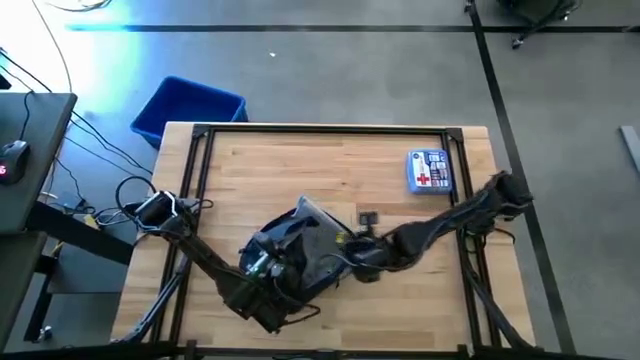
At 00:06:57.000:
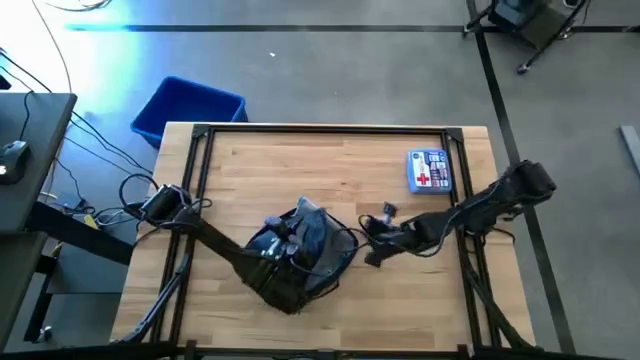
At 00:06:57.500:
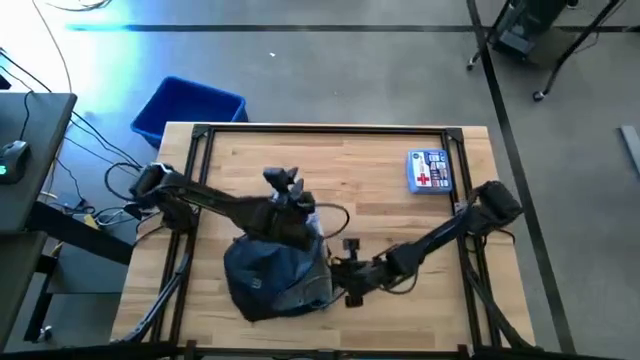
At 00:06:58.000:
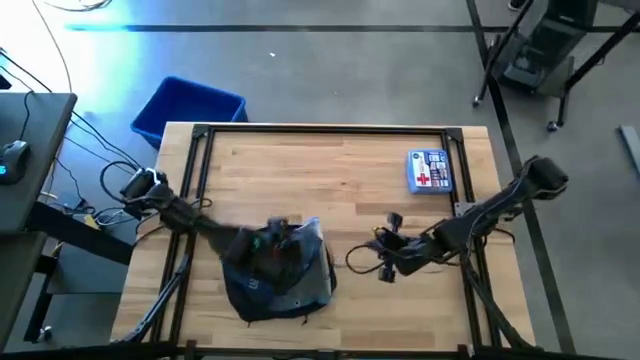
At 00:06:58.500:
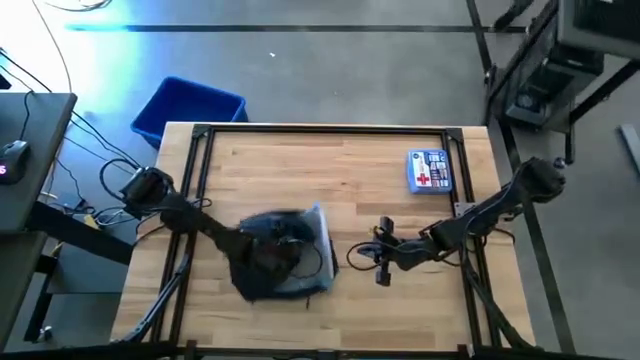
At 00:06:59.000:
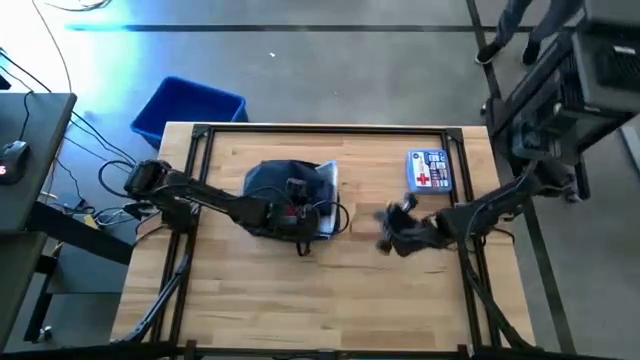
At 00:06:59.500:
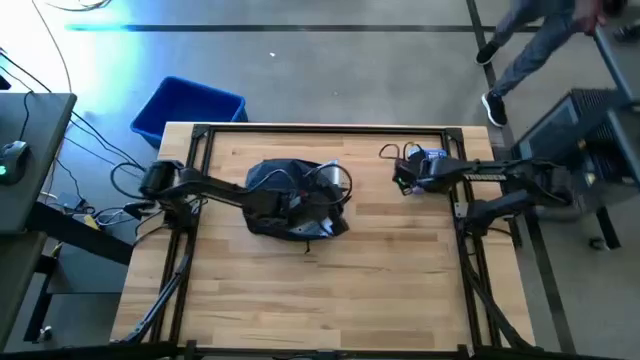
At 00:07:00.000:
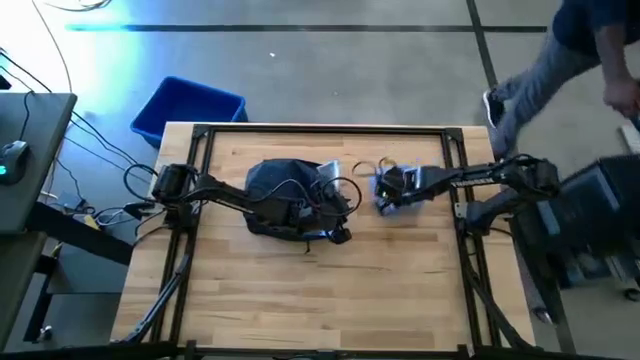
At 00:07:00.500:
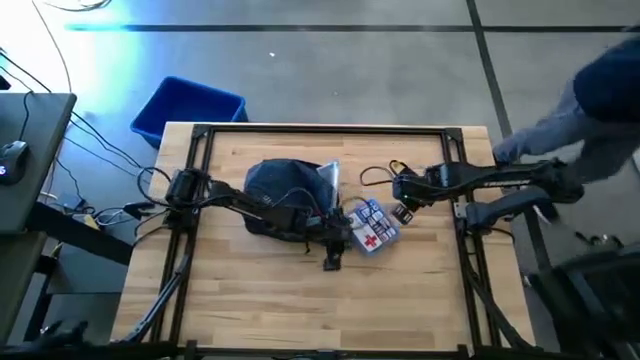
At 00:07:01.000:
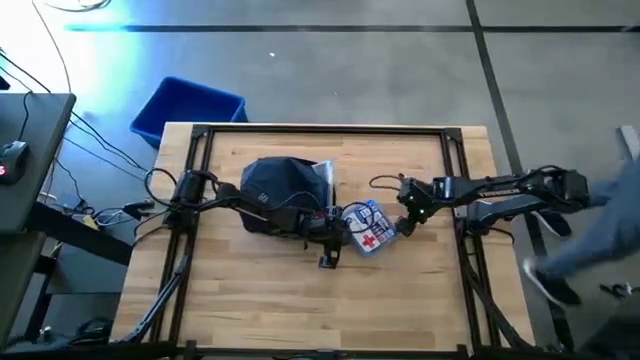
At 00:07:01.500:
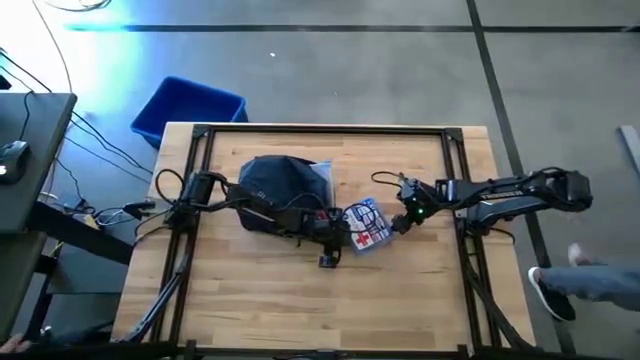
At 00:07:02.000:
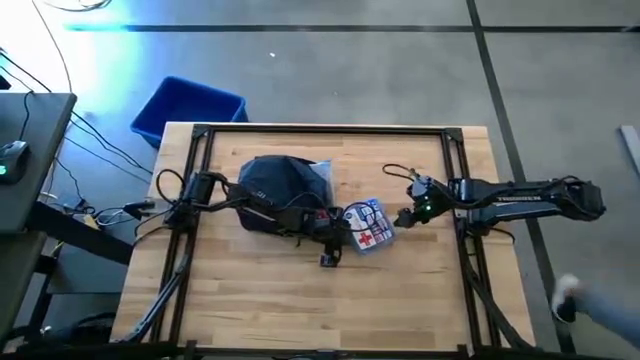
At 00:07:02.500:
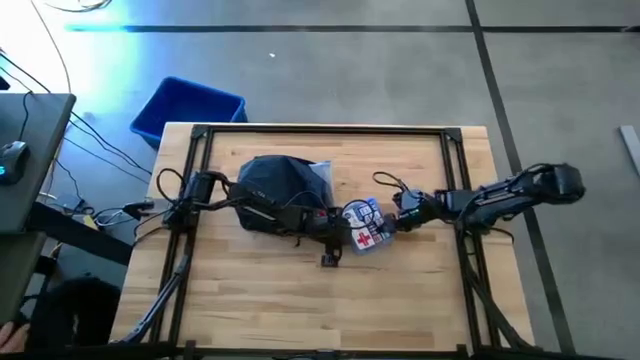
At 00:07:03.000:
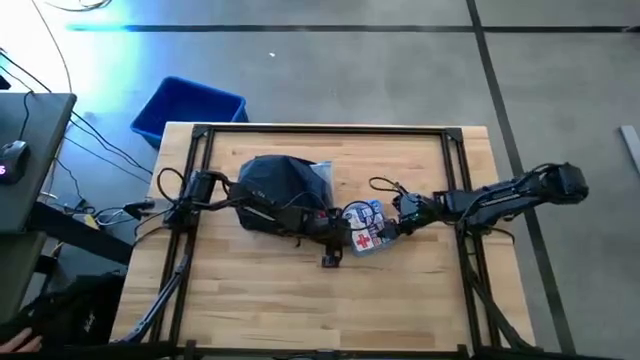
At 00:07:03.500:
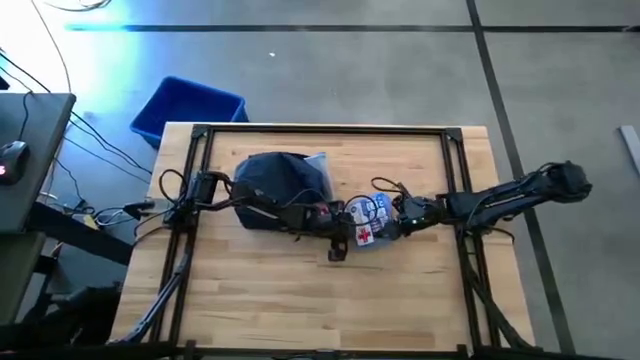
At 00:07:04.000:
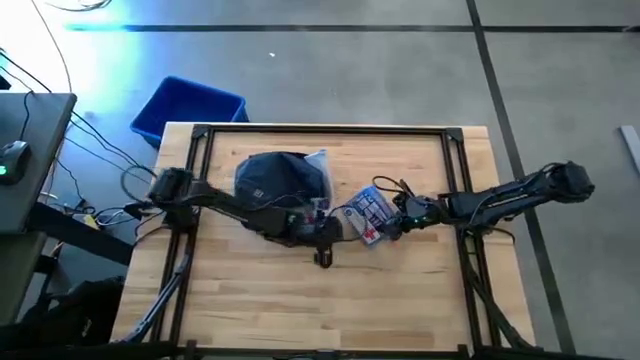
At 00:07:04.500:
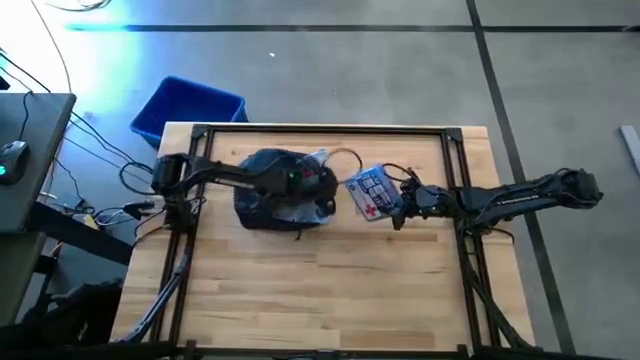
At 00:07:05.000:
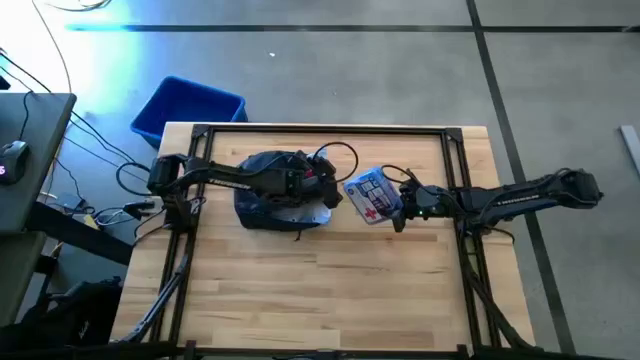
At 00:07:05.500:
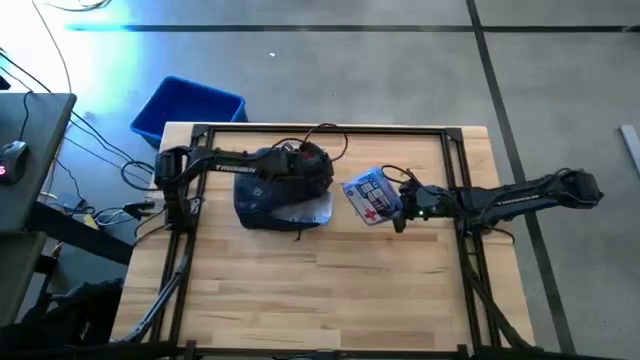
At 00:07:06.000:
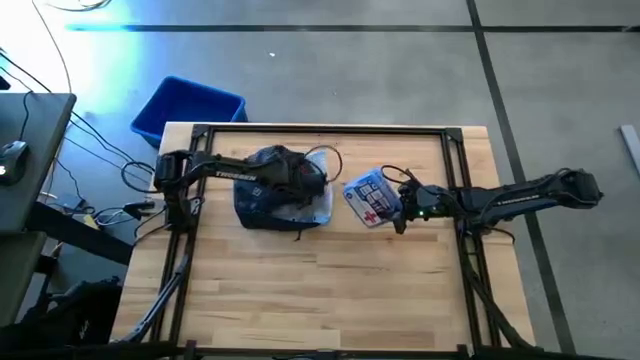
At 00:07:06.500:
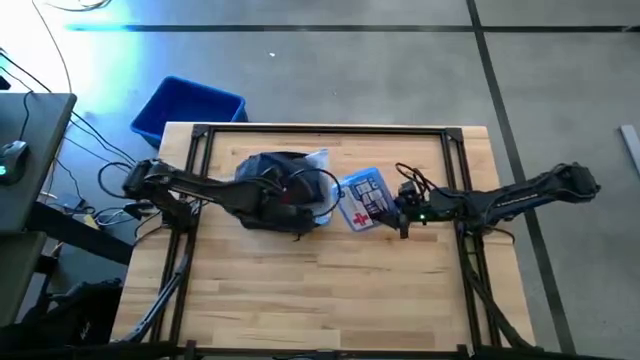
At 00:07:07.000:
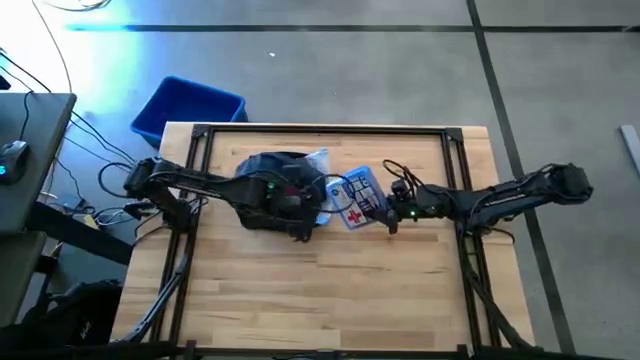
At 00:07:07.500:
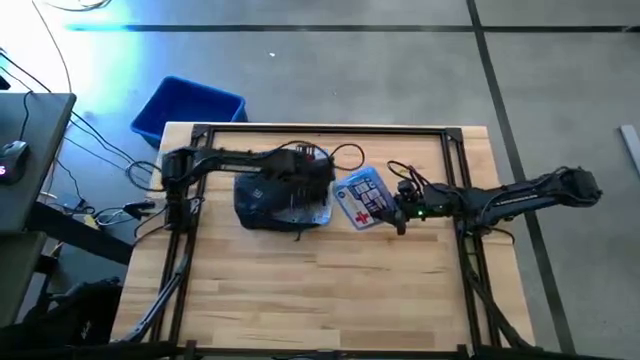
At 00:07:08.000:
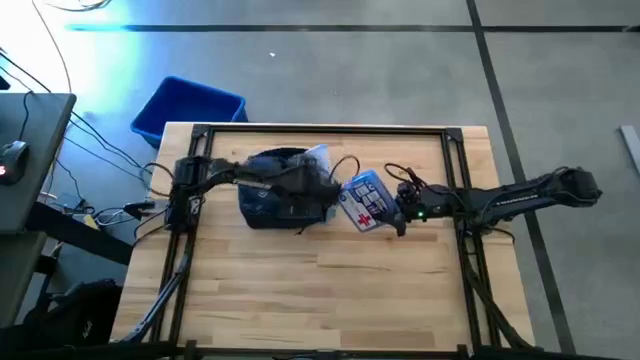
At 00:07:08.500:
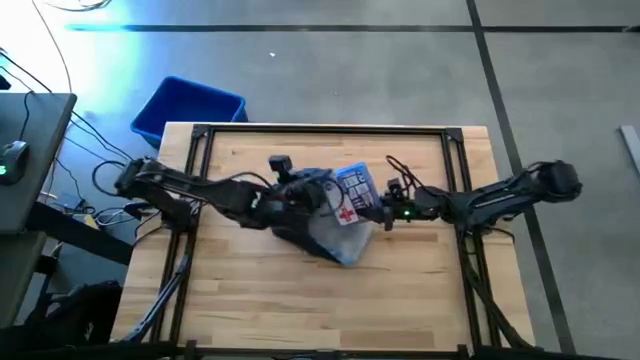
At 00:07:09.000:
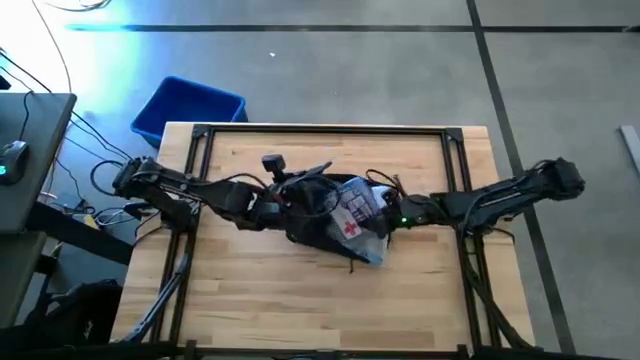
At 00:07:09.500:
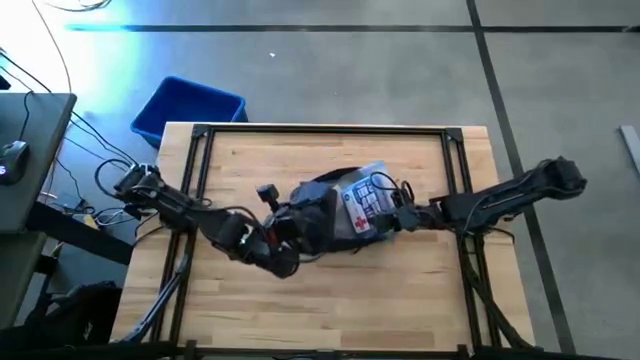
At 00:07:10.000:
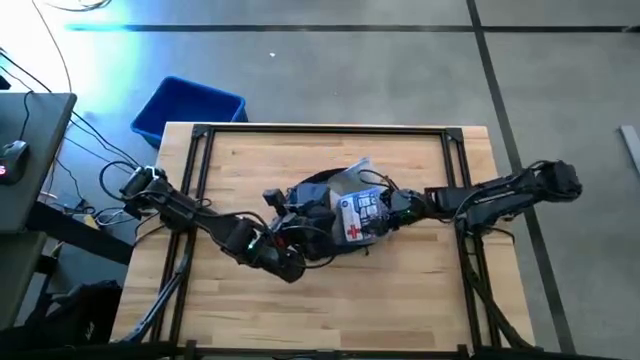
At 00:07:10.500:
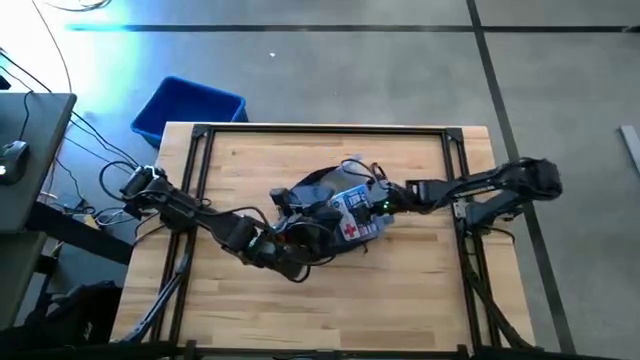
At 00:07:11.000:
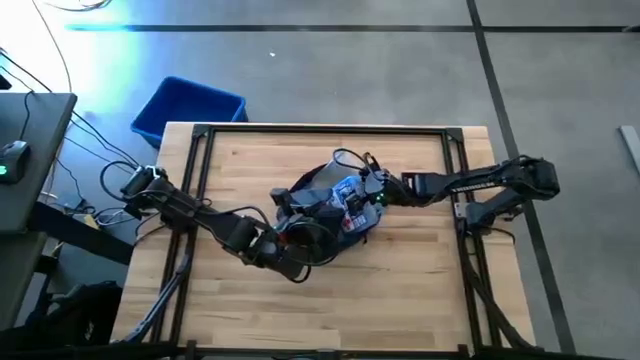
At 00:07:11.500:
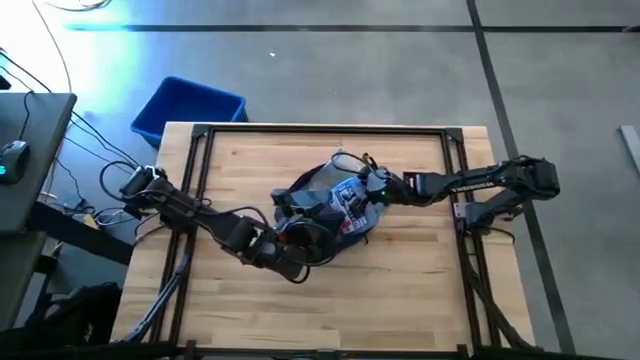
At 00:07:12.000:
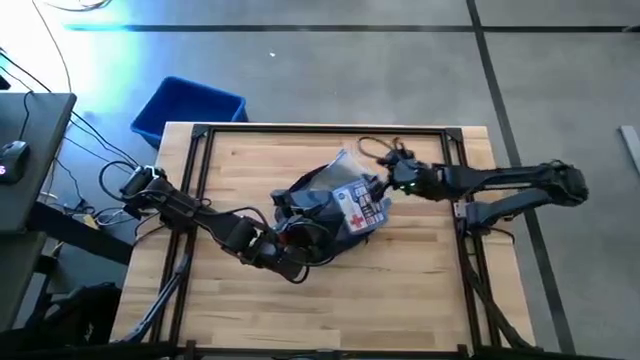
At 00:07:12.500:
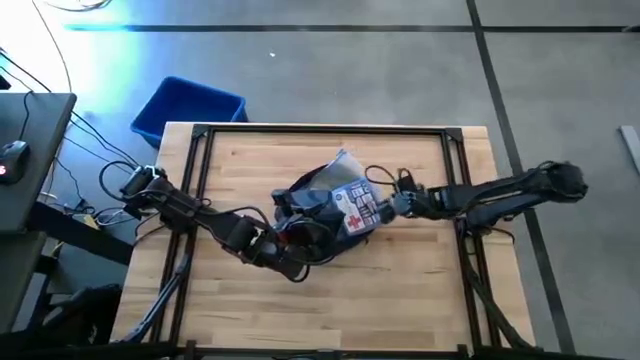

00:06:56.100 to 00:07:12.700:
Task: Unpack backpack
Put the blue medicine kit into the backpack

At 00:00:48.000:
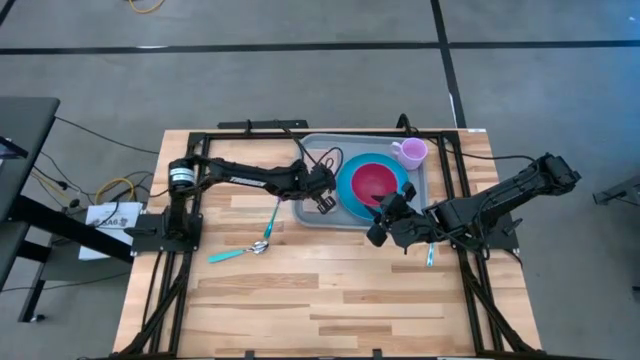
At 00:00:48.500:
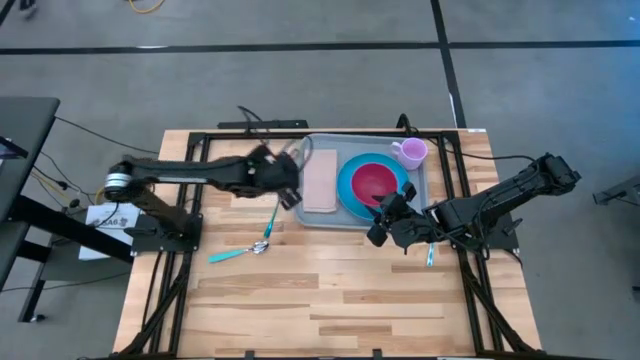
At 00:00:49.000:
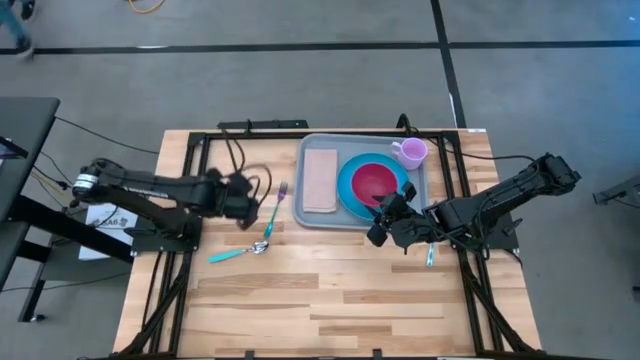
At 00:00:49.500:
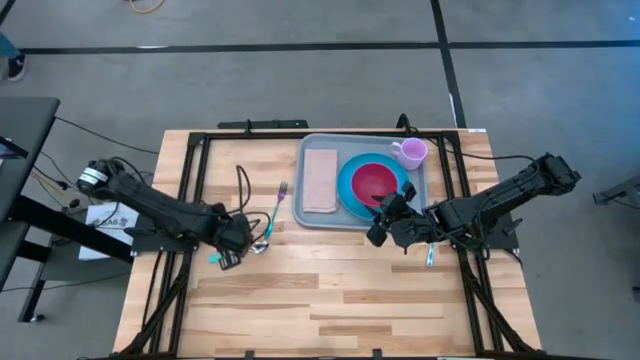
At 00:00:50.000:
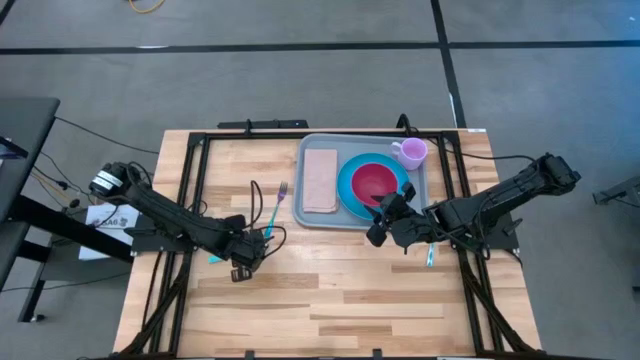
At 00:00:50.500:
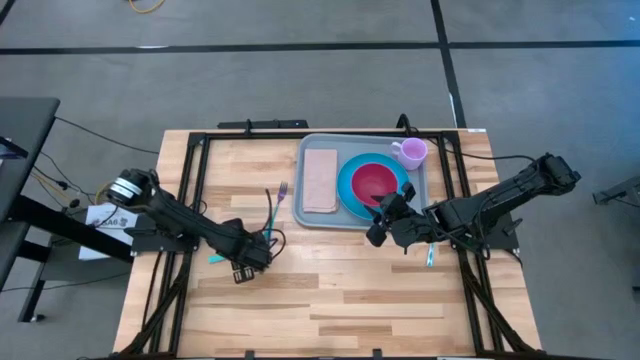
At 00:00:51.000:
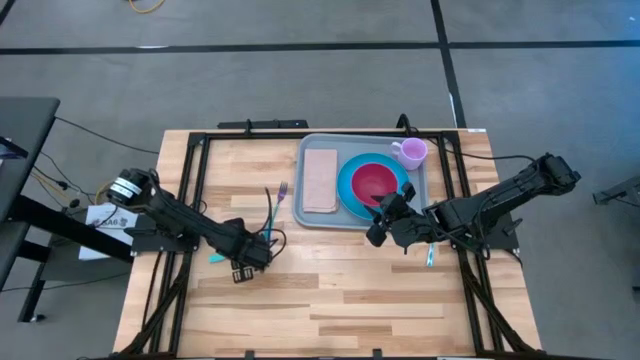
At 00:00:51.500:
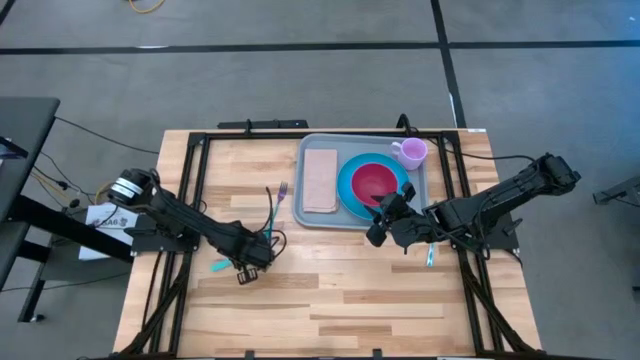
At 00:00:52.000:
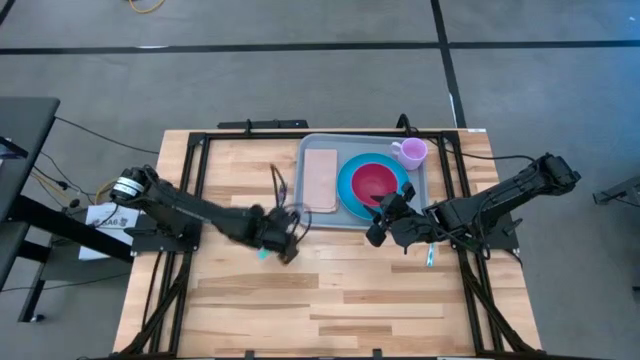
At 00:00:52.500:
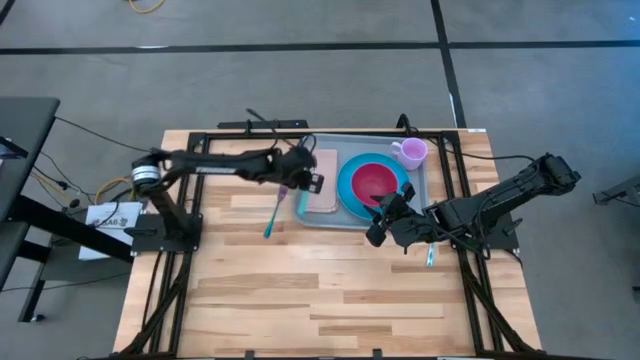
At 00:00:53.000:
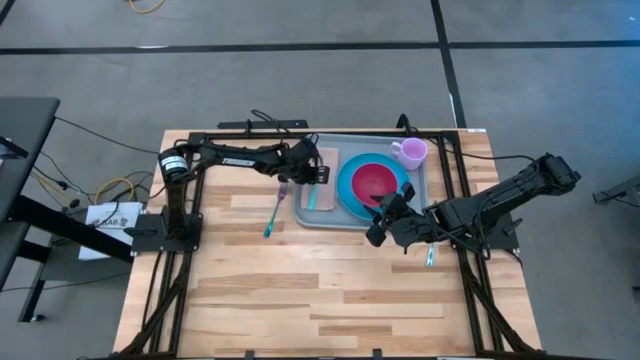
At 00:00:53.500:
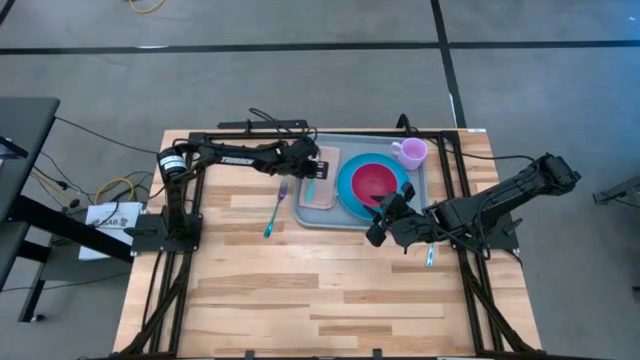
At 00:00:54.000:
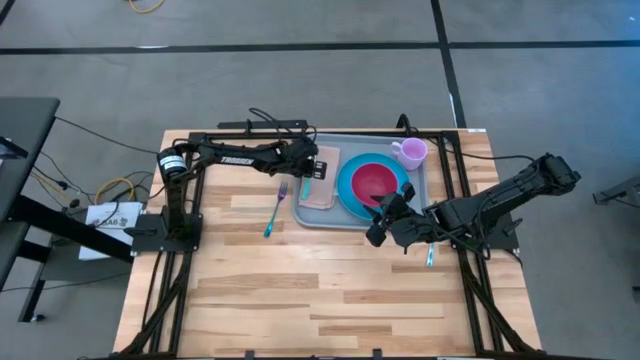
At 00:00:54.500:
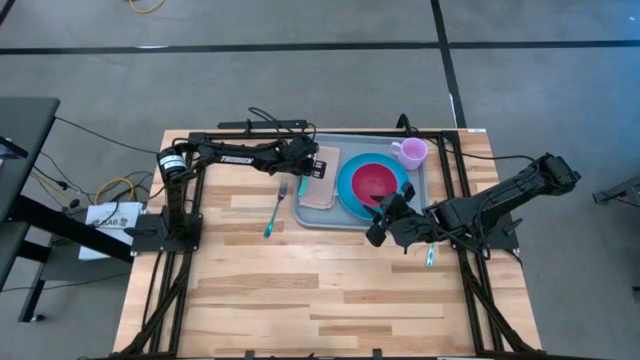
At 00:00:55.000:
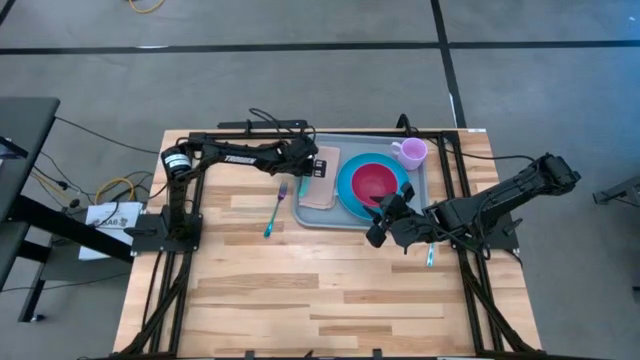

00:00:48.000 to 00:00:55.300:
Task: Set up tray
Put the light blue spoon on the brown napkin
